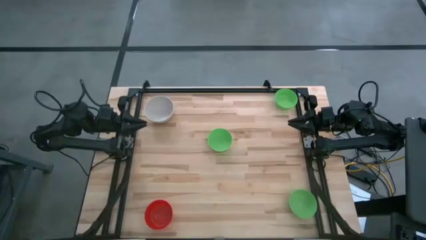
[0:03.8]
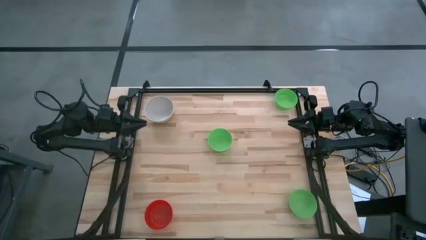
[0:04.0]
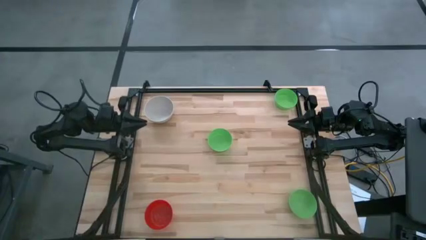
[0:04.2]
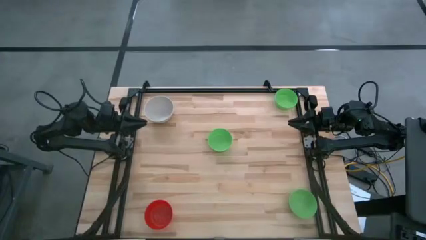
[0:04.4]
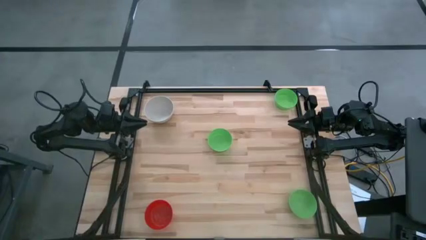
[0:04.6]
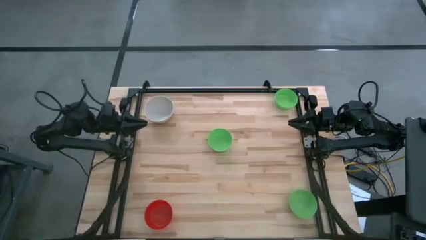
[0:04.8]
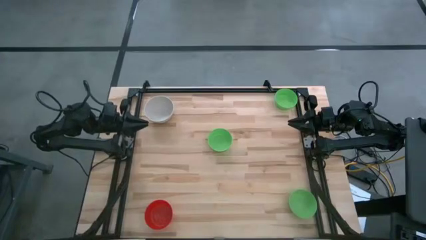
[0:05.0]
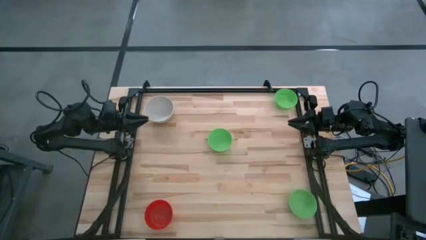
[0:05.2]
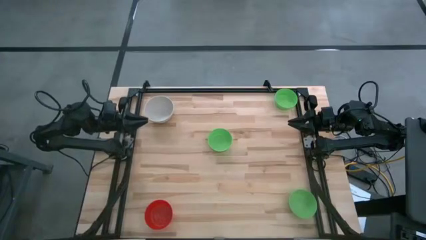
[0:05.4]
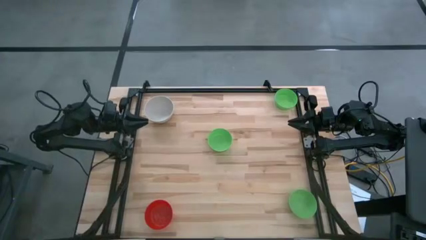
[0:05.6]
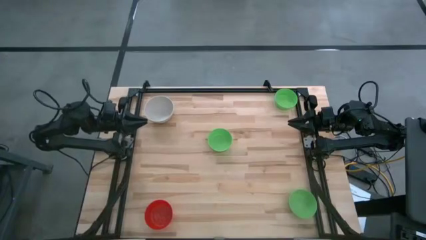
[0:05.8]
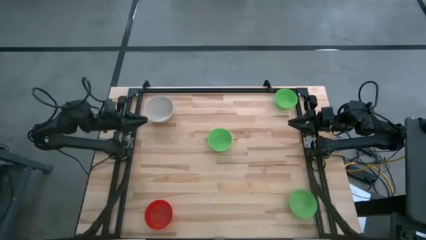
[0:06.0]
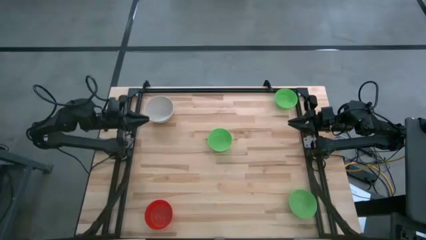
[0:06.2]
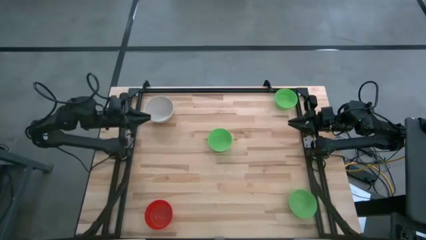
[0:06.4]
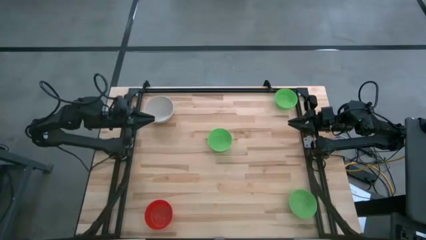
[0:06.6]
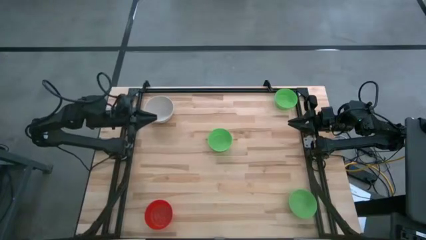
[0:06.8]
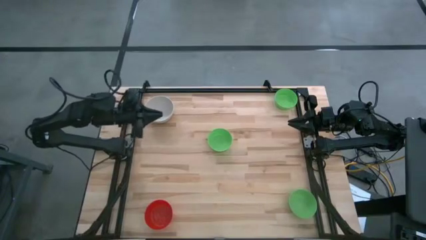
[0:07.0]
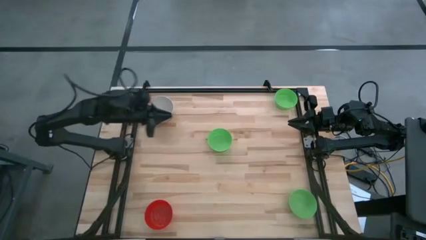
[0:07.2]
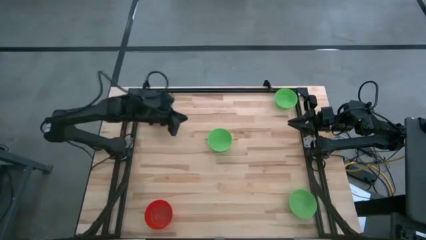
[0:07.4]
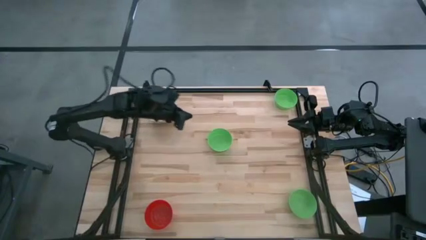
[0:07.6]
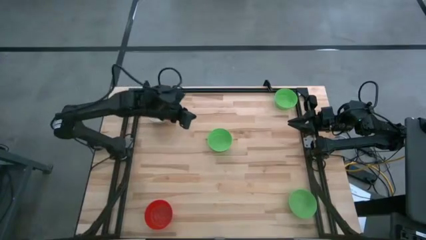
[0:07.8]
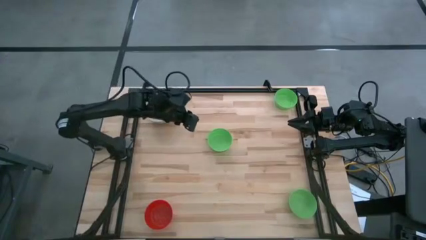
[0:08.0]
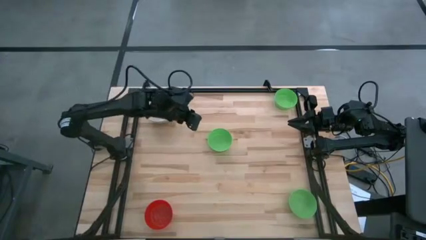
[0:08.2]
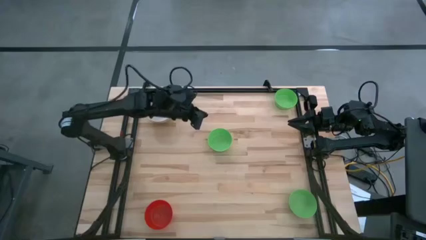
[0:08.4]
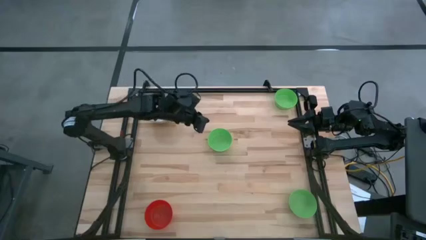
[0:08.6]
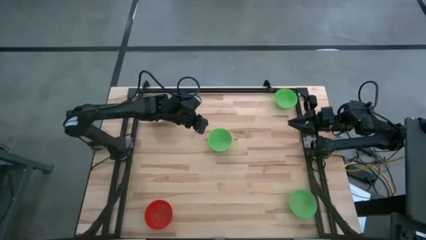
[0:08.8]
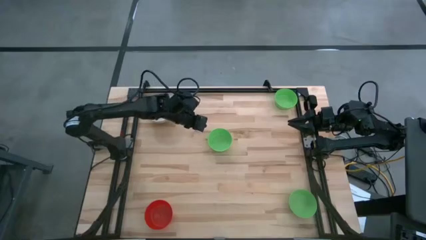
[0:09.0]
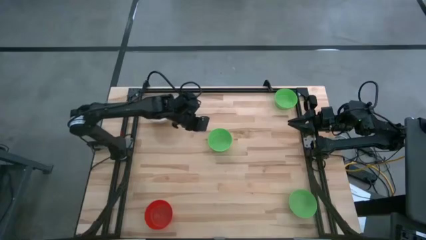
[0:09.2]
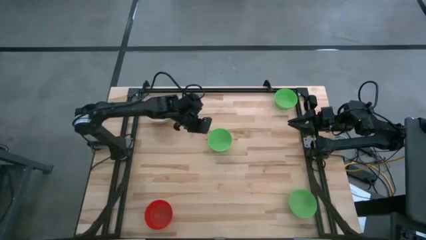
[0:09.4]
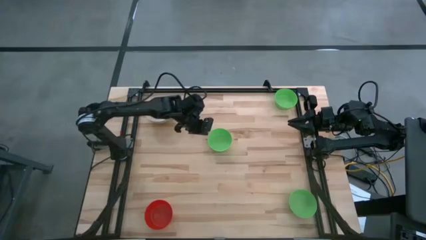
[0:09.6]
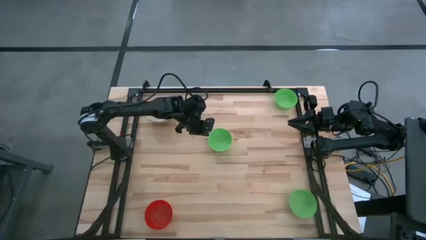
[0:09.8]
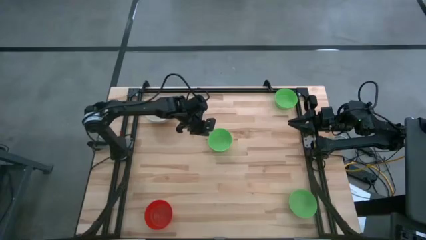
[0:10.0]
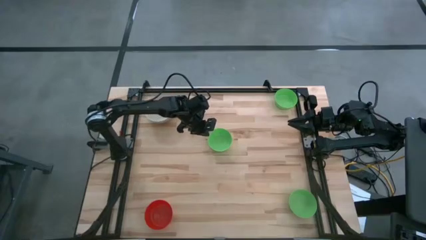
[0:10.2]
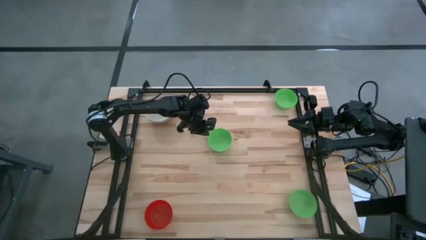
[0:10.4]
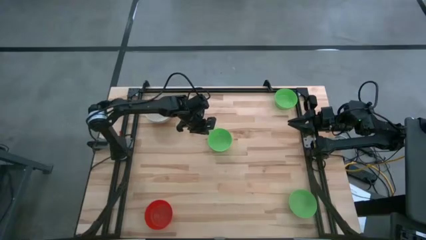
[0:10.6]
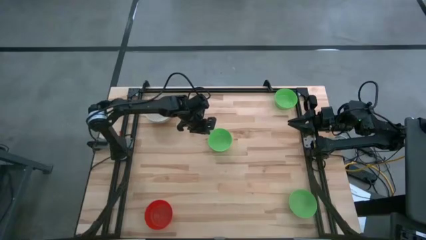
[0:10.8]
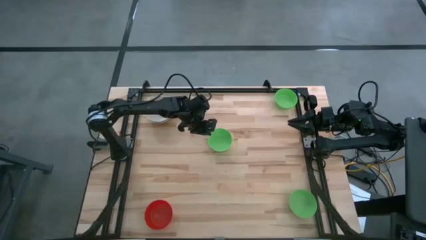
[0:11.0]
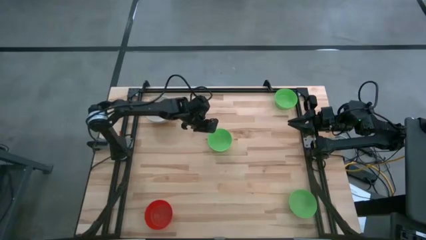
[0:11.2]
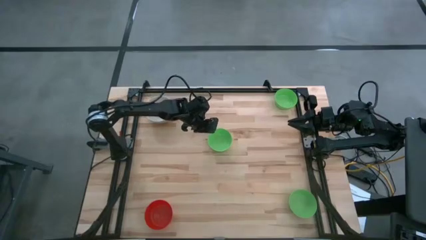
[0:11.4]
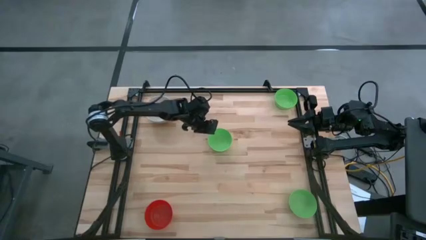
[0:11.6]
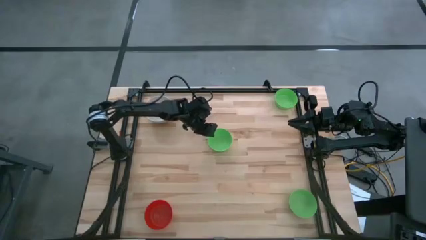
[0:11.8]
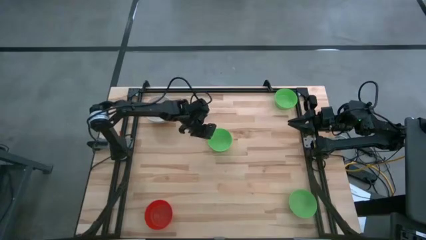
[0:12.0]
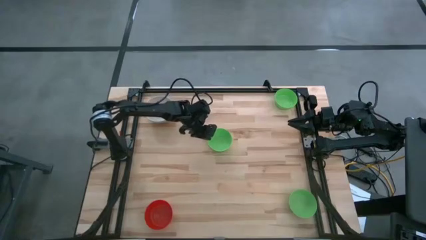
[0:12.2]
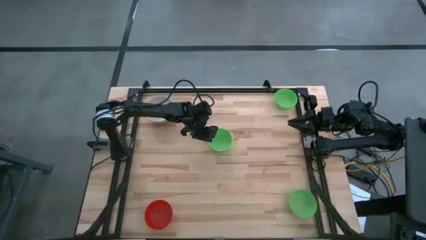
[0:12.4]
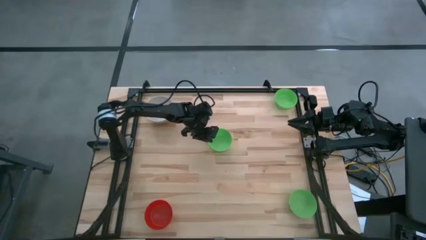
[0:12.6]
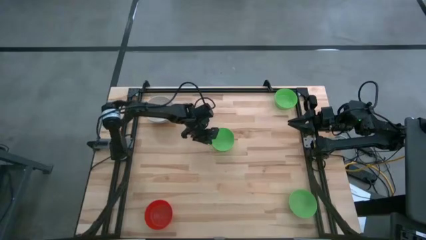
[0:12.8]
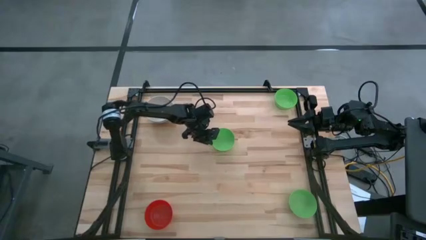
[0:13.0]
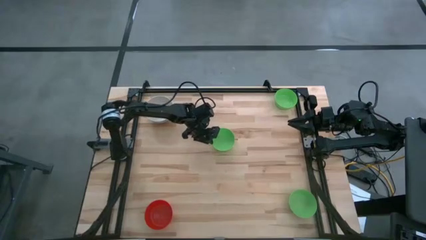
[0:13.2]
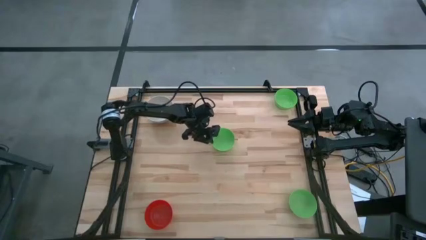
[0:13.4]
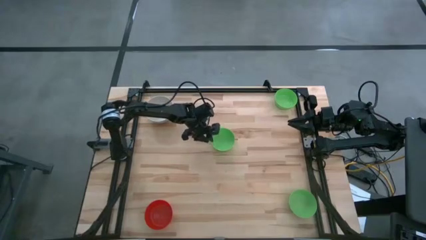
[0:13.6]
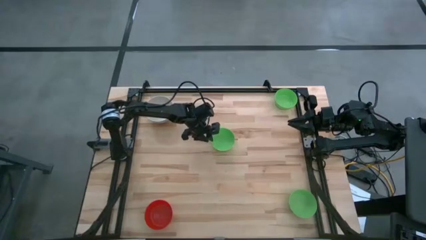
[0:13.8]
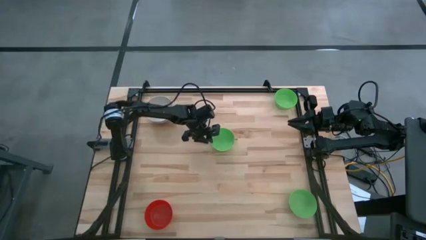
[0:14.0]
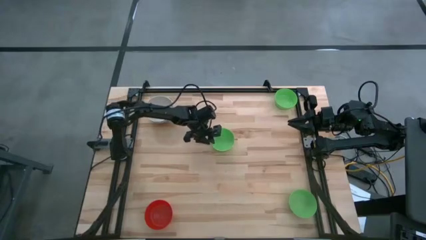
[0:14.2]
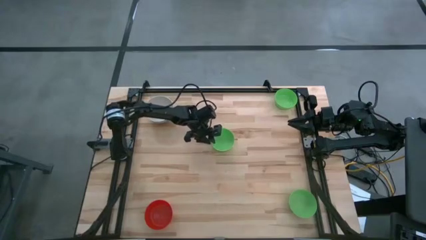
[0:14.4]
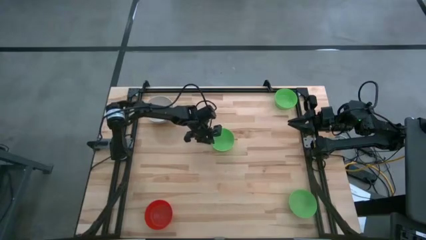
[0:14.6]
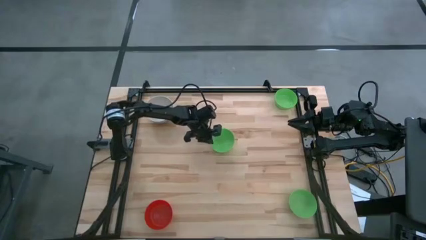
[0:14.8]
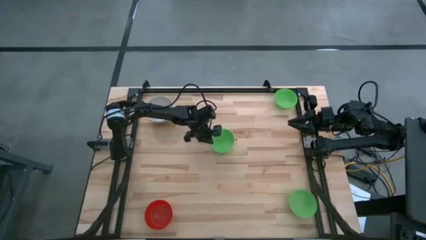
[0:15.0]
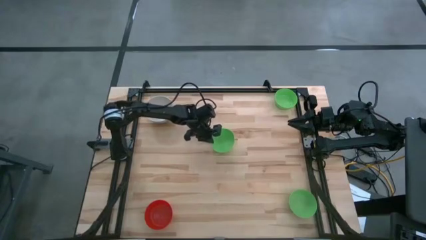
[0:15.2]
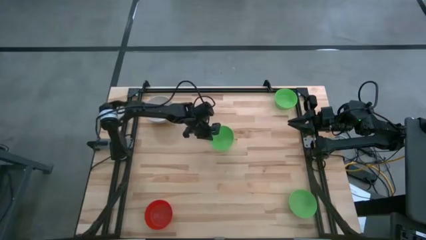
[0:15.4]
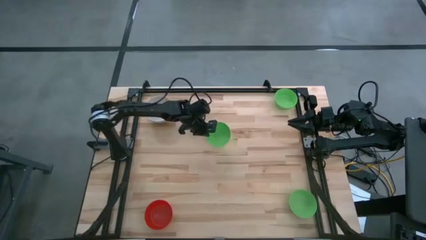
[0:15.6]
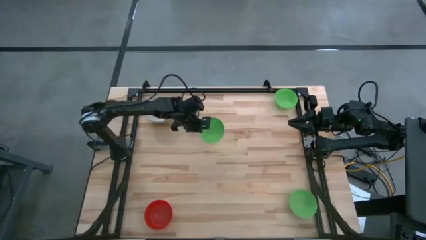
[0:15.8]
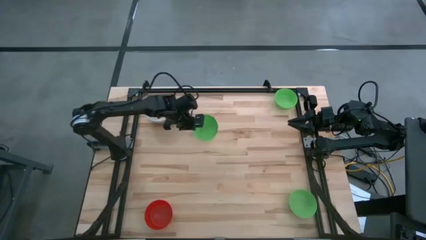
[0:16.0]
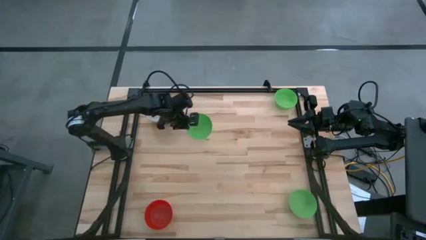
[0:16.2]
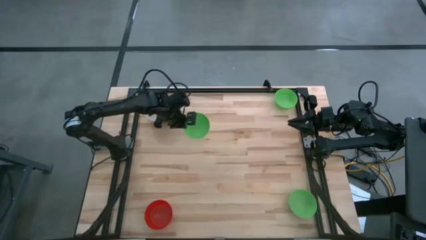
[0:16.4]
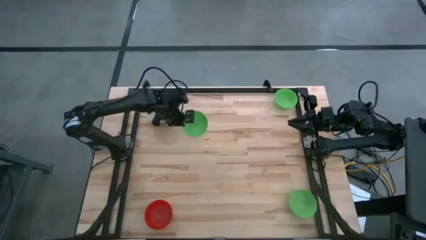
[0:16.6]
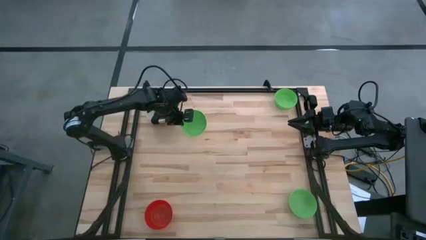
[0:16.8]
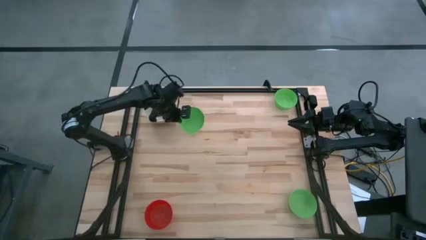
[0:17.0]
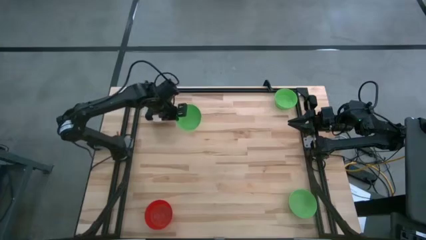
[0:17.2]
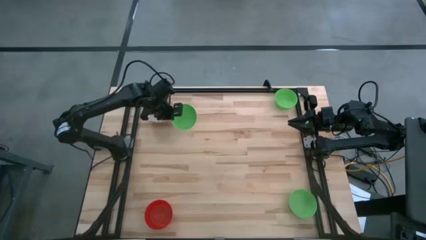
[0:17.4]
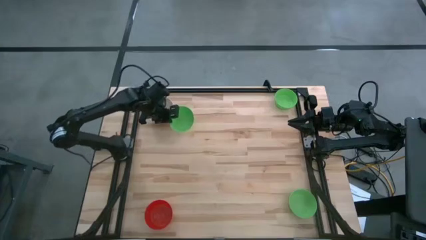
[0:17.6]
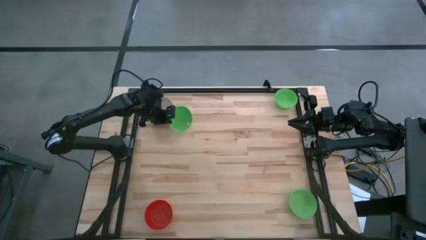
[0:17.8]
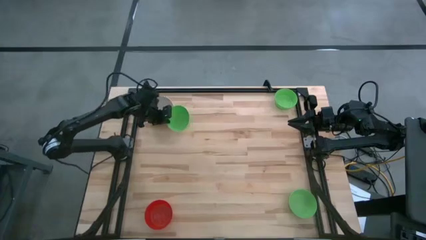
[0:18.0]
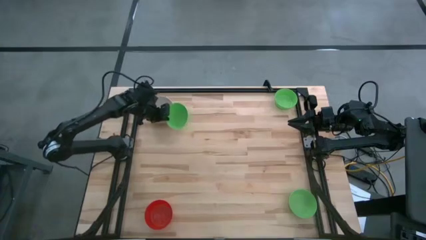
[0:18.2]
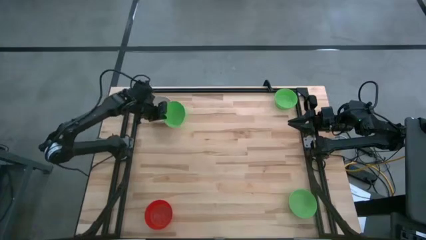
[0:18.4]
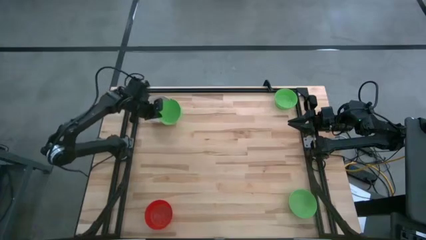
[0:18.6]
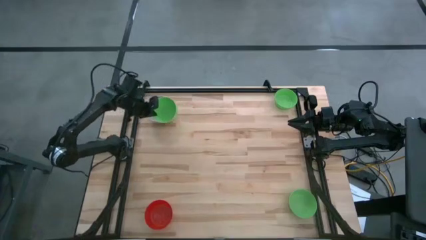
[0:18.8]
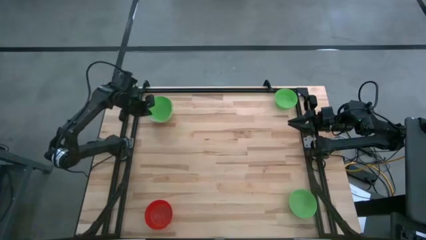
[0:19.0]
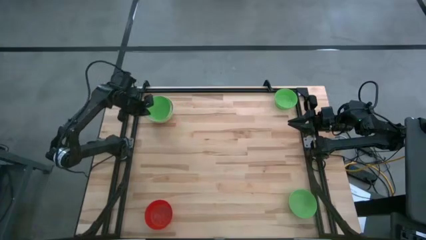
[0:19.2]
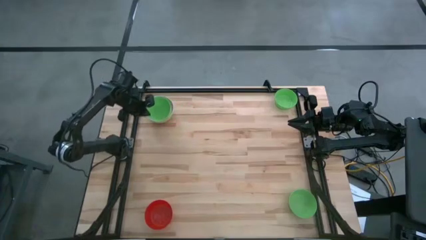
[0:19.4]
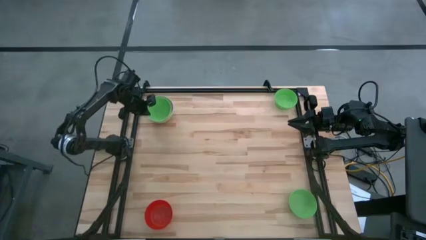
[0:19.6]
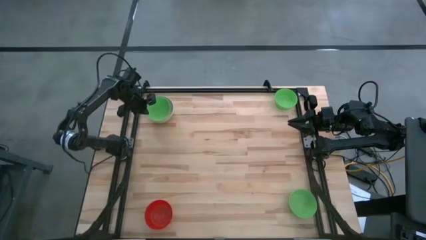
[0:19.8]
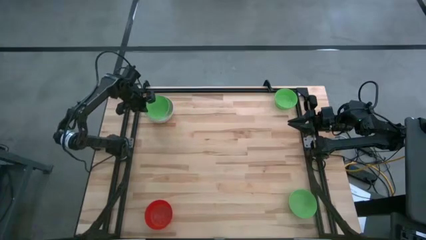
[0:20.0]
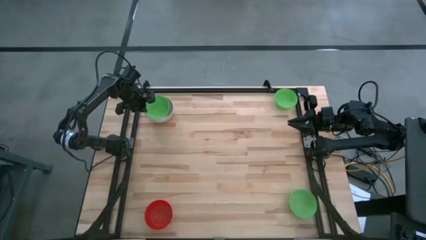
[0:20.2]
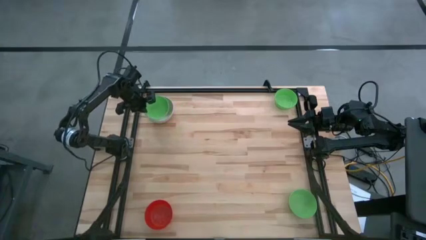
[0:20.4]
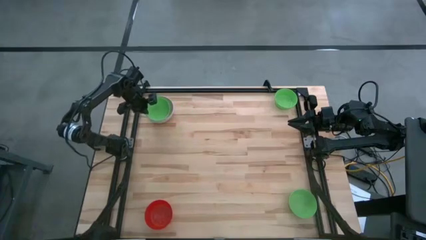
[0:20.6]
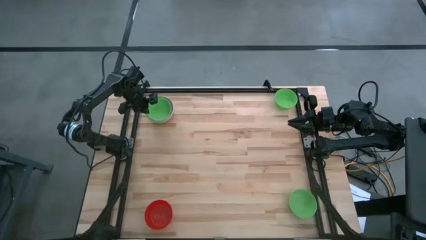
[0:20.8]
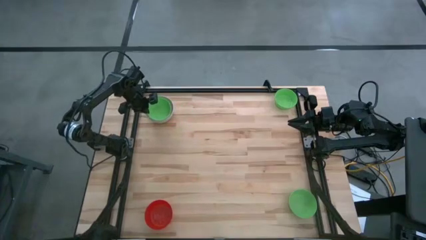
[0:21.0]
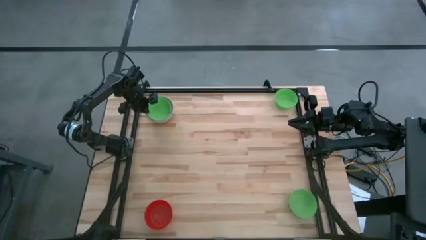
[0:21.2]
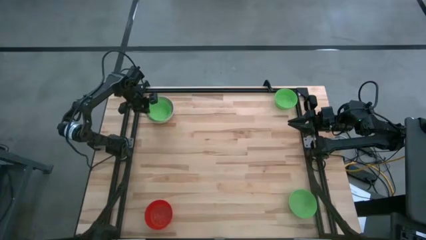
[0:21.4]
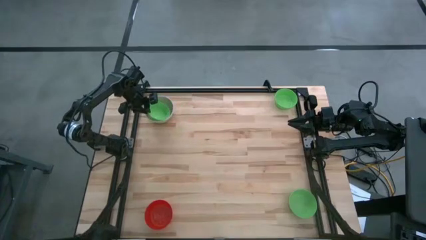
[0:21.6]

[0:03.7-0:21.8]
Stack the middle green bowl on the gray bowl
